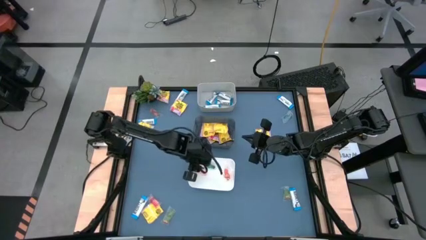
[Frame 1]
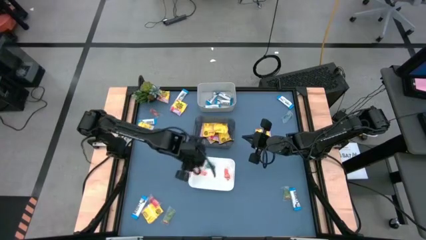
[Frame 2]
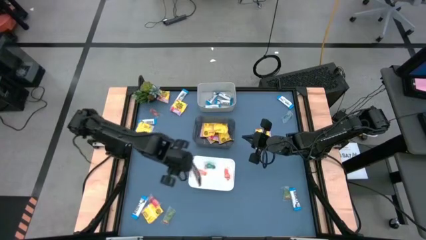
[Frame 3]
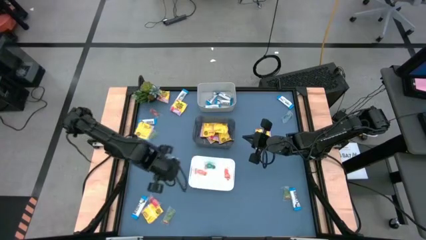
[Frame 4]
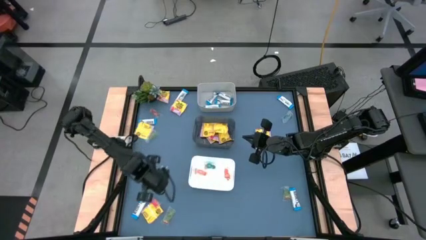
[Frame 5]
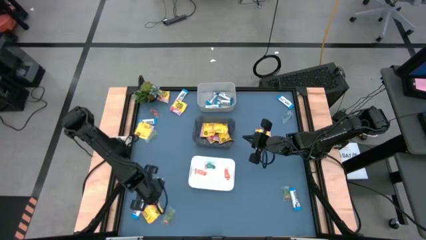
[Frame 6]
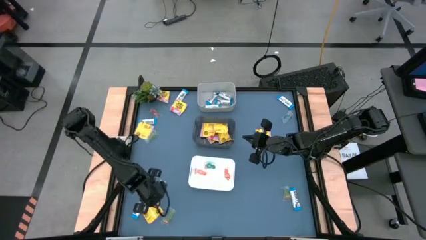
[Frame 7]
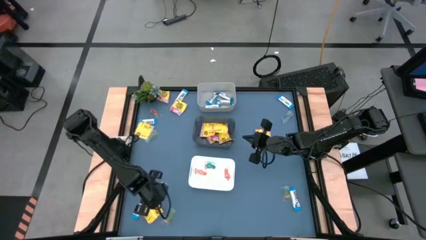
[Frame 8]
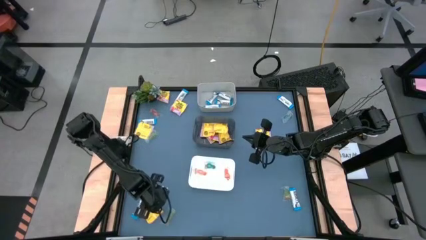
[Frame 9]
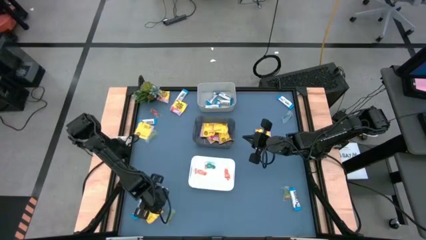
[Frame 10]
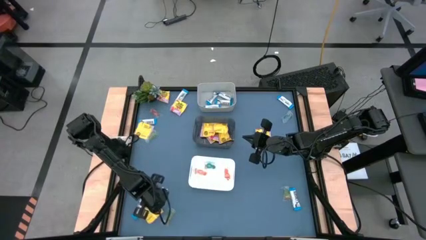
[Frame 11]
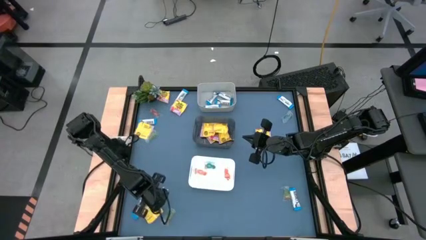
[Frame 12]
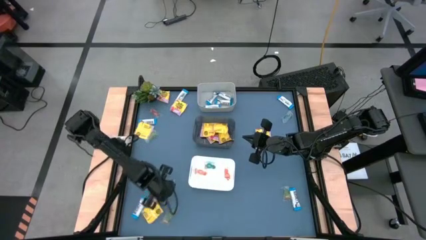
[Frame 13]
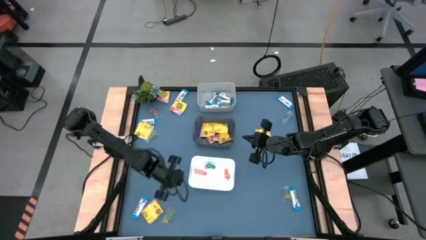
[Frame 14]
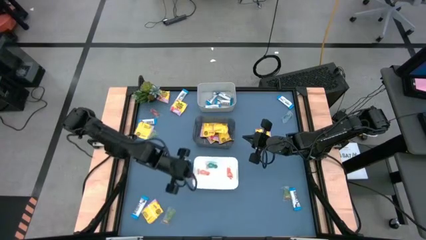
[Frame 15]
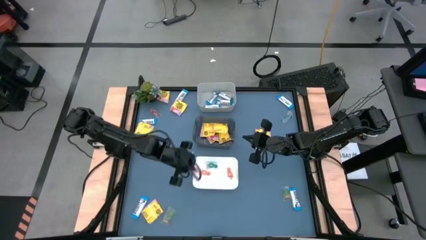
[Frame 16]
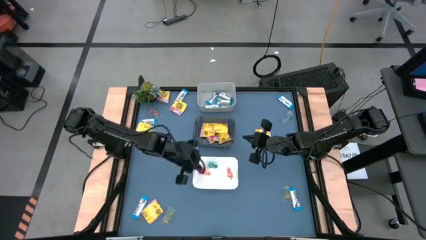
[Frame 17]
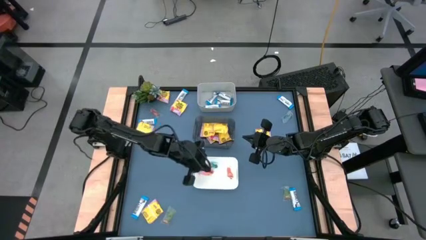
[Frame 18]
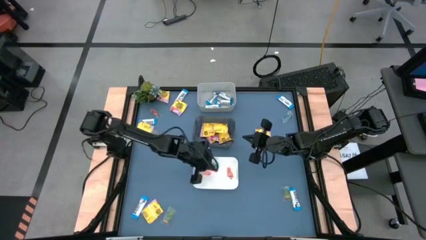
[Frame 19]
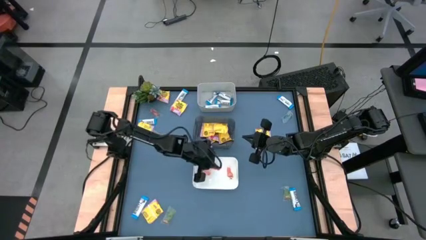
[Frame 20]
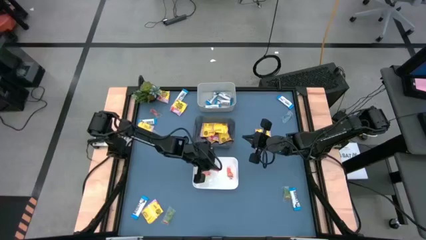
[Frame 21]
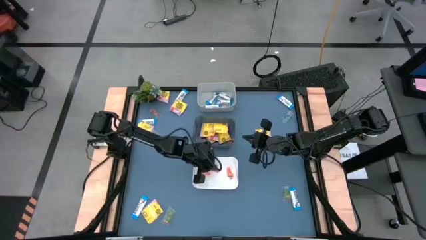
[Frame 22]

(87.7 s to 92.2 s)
Task: Sort candy
Put the red gummy candy into the white bin

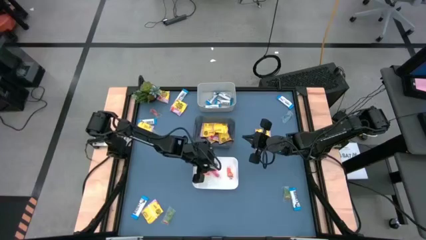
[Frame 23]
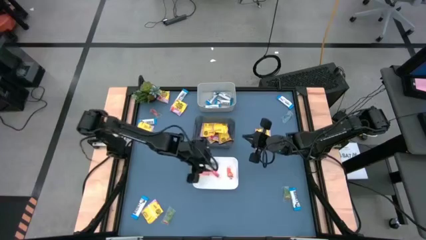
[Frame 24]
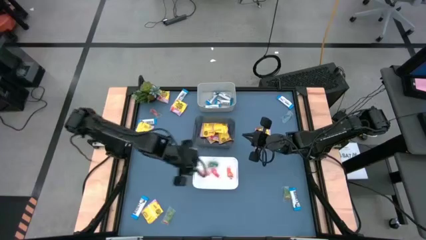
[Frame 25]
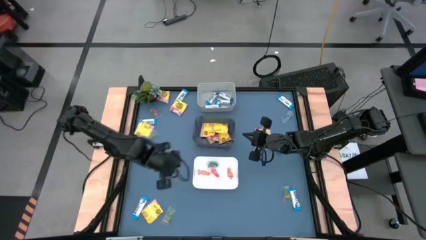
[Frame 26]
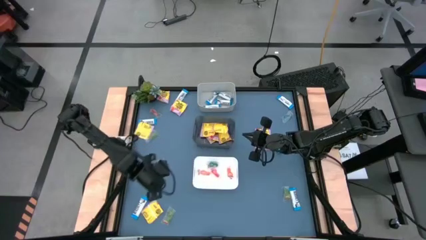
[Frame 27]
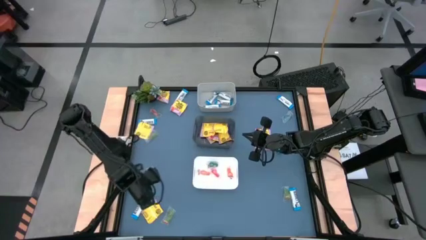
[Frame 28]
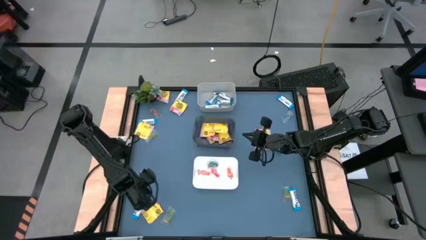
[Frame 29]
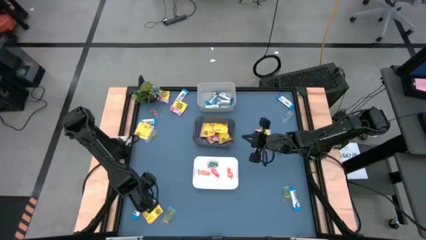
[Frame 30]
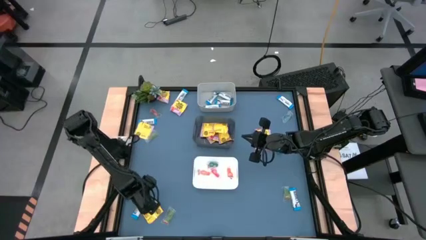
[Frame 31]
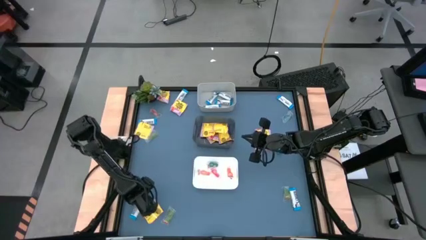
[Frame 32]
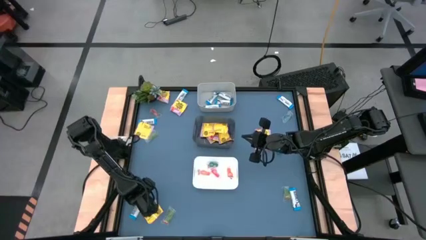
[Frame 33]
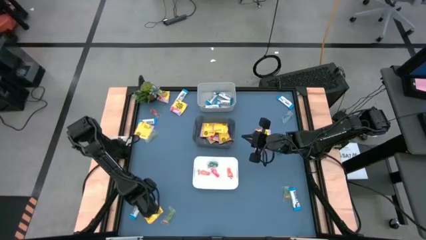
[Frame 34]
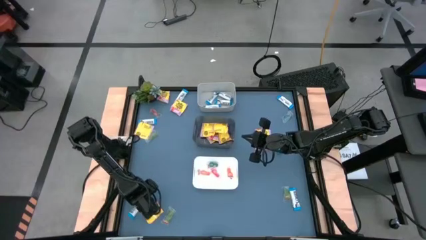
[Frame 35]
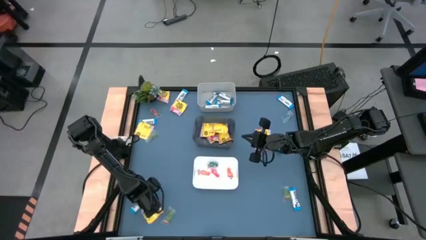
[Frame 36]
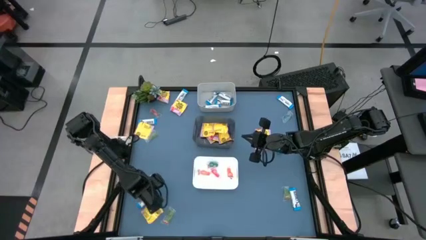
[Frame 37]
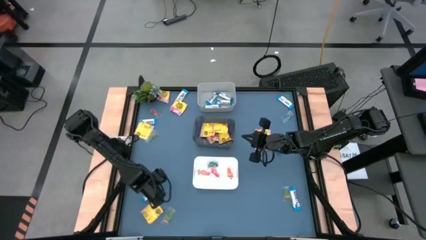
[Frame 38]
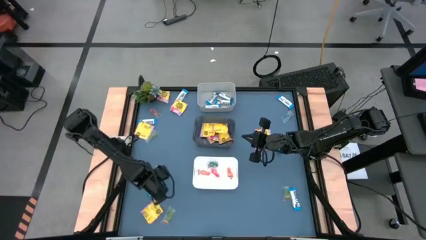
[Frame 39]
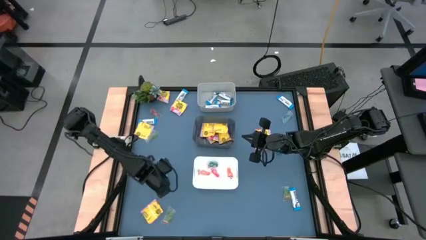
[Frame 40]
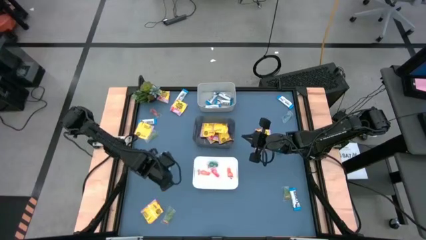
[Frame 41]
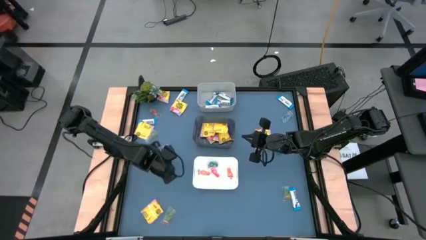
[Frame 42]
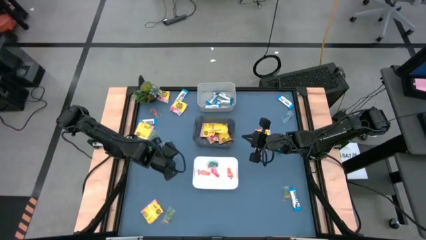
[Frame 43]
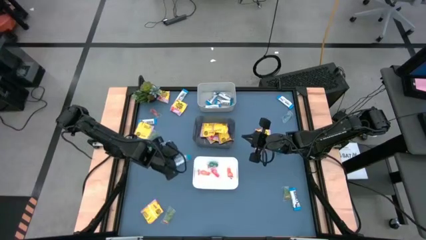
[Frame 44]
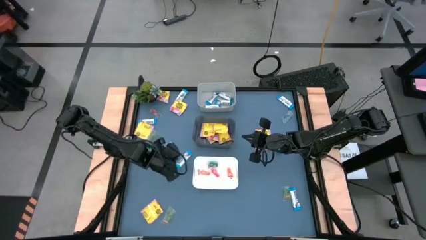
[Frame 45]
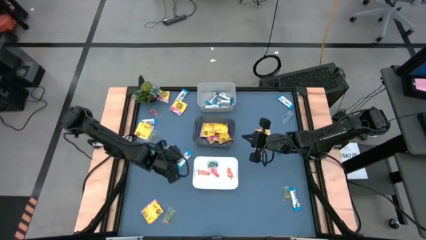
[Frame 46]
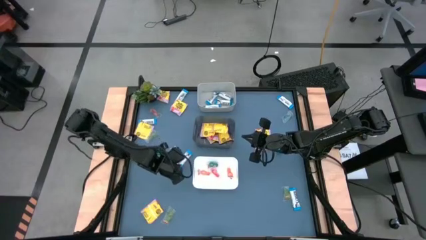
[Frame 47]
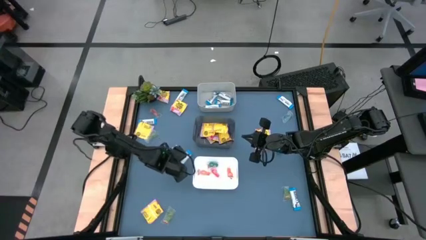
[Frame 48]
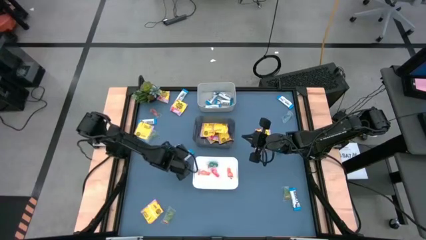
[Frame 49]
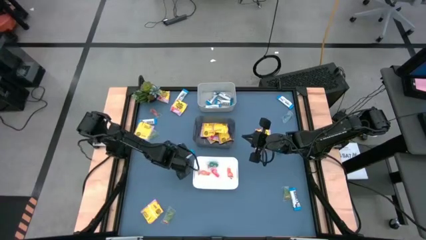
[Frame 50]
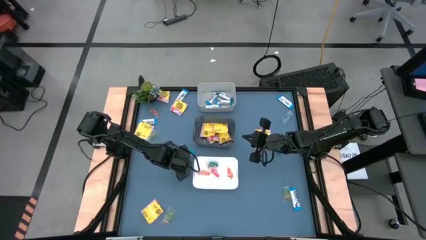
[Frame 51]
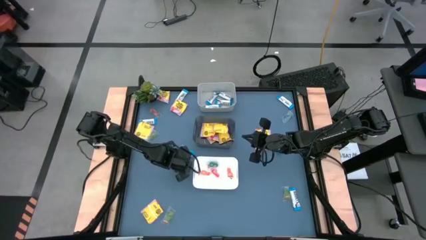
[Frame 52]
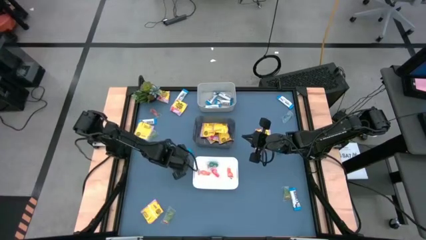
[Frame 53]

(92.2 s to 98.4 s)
Put the white chocolate bar into the gray bin

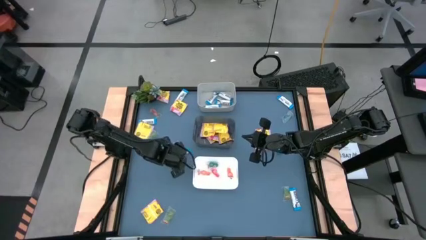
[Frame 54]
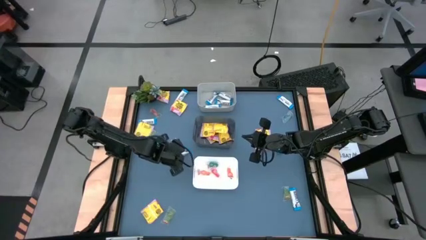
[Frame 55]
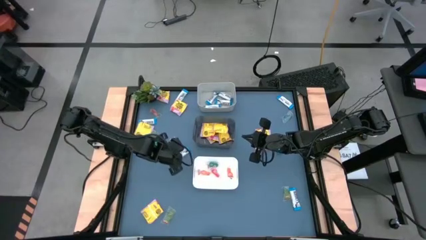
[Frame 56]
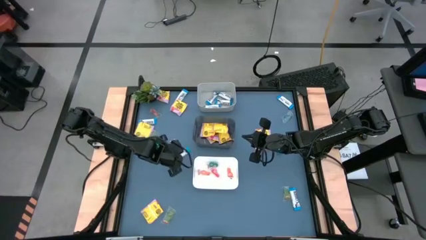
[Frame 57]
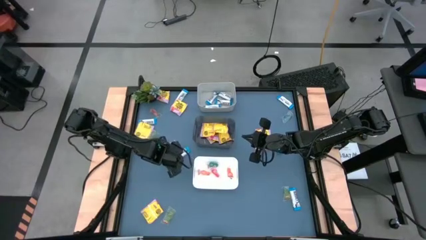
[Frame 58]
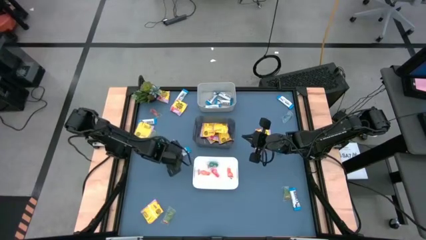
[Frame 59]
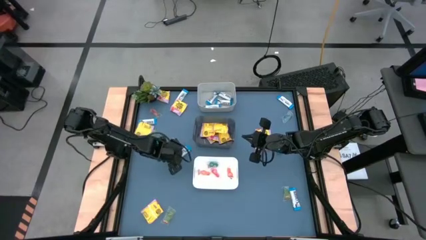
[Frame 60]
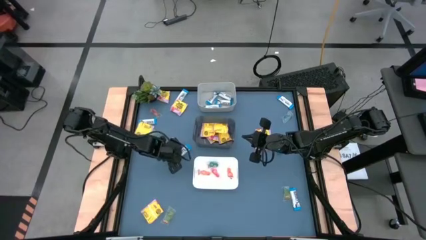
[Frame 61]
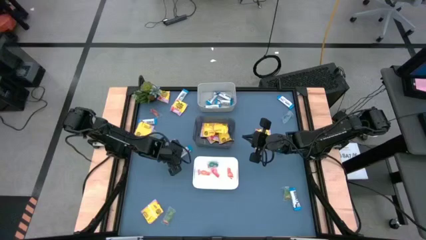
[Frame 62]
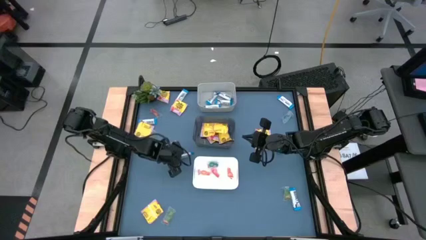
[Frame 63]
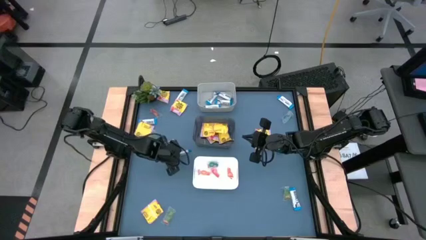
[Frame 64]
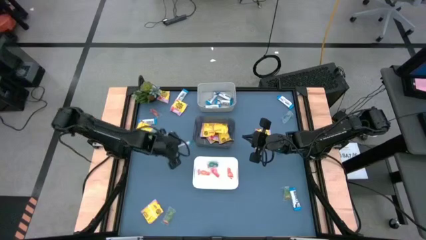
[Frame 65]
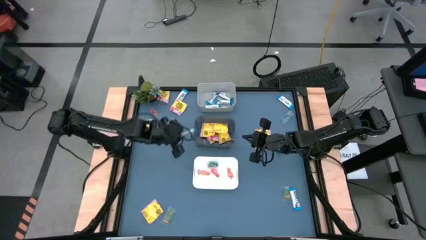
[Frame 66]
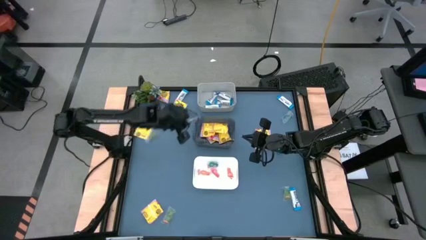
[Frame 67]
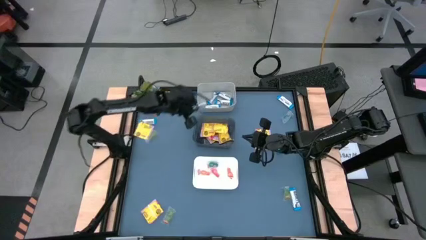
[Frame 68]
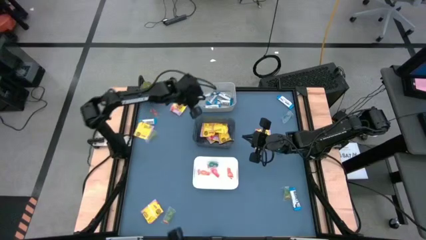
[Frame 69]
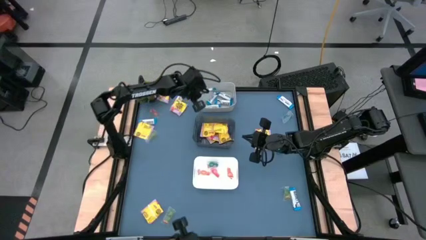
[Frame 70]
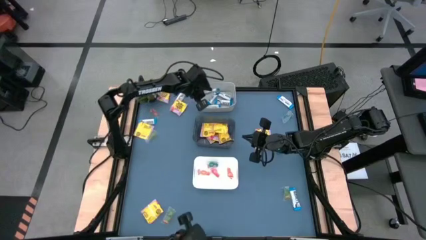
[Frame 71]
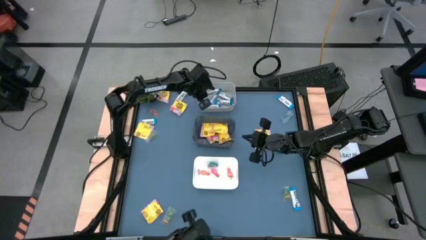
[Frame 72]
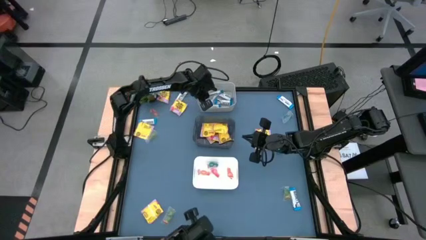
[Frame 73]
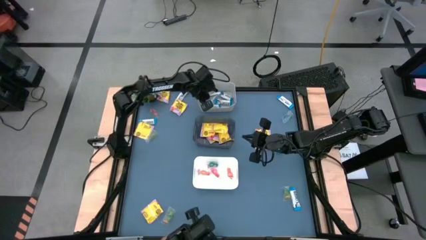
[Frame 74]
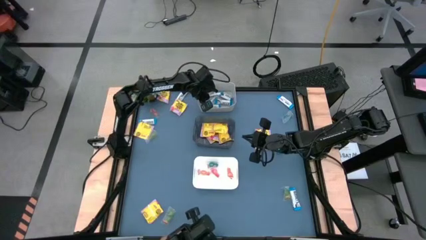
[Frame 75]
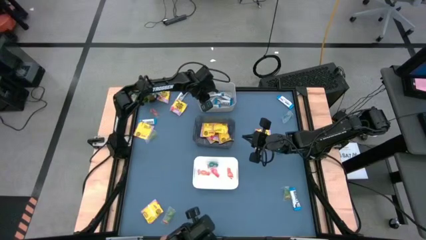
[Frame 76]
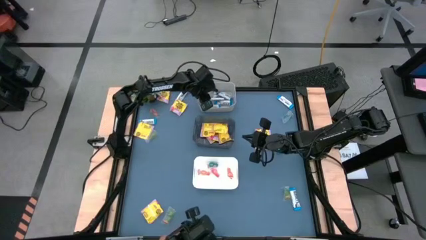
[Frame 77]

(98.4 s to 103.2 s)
Put the white chocolate bar into the gray bin

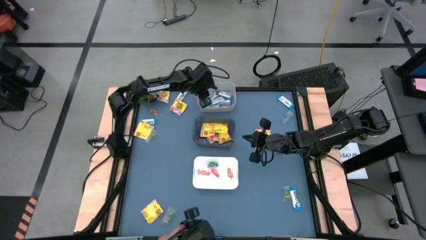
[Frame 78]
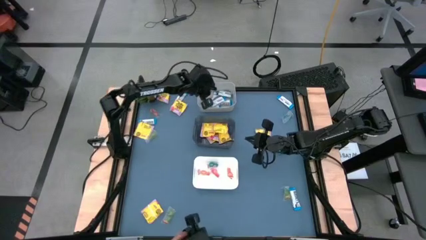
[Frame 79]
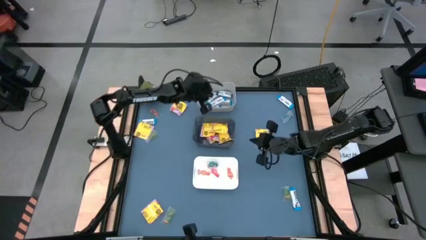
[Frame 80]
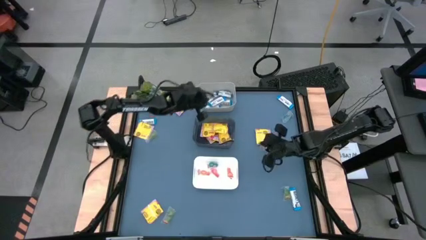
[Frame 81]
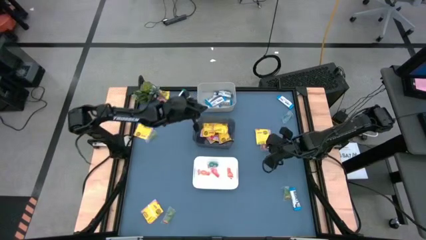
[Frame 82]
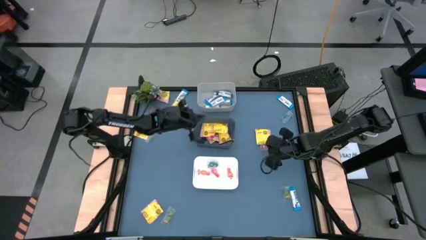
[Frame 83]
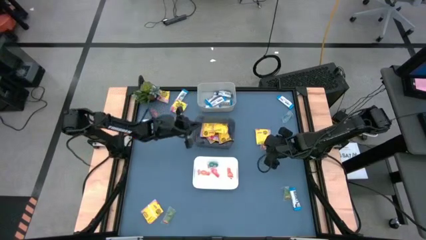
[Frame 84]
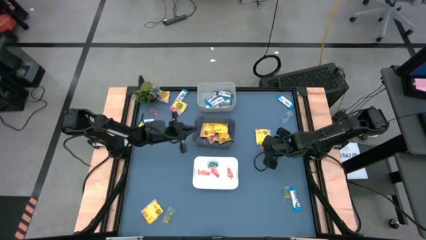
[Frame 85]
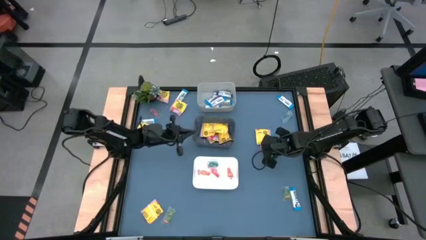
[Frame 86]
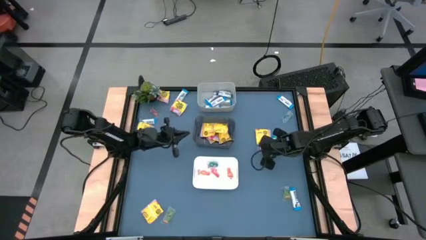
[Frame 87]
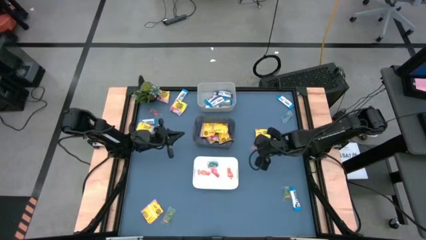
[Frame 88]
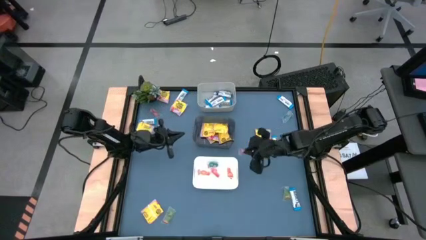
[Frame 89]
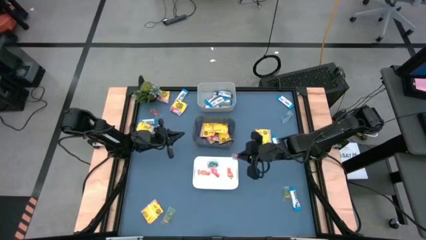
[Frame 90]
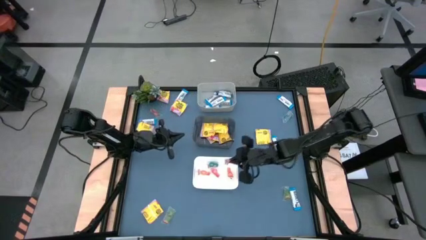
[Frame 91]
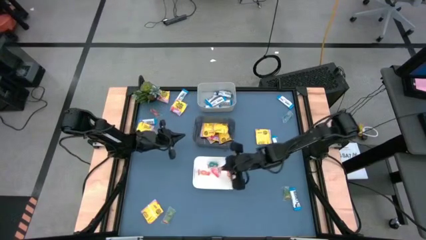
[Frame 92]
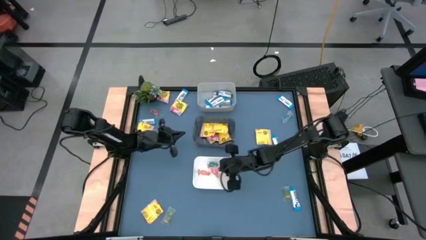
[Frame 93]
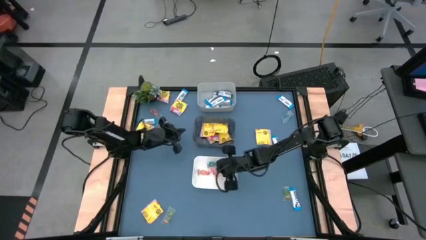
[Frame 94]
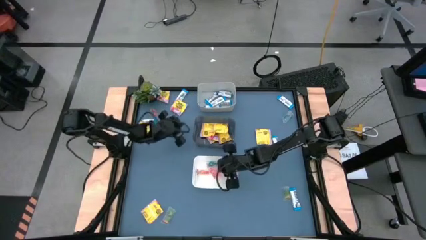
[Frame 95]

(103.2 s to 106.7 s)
Put the orange gummy candy into the white bin
